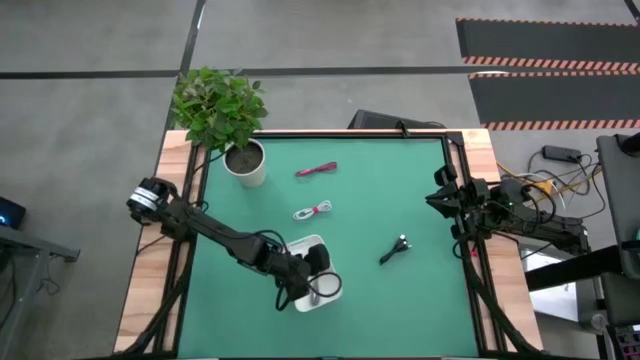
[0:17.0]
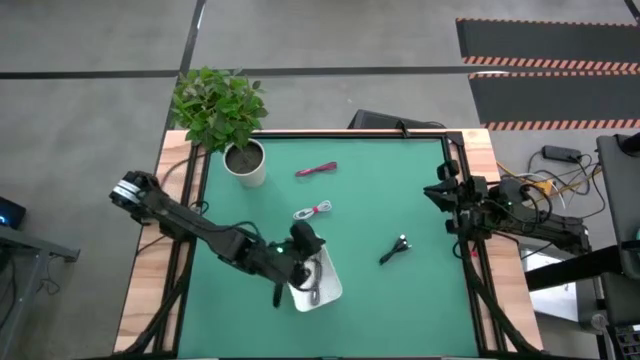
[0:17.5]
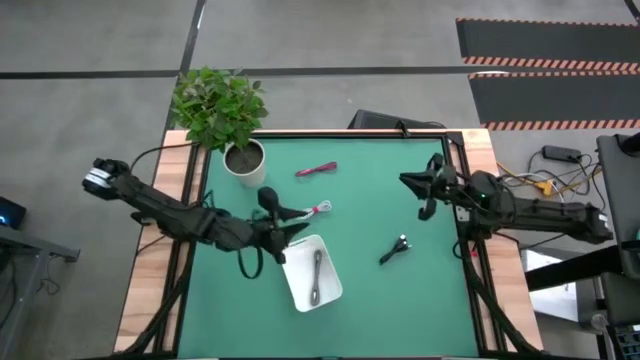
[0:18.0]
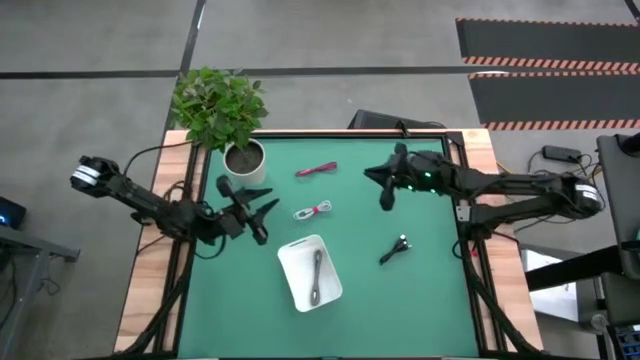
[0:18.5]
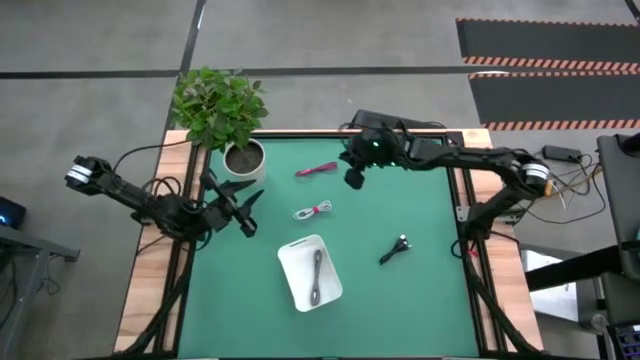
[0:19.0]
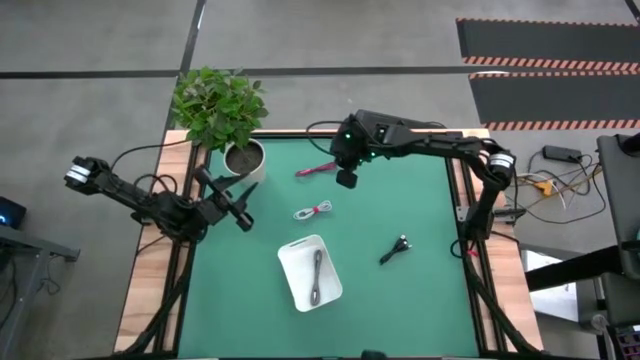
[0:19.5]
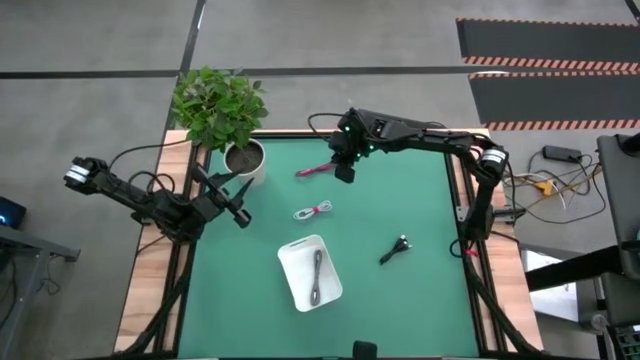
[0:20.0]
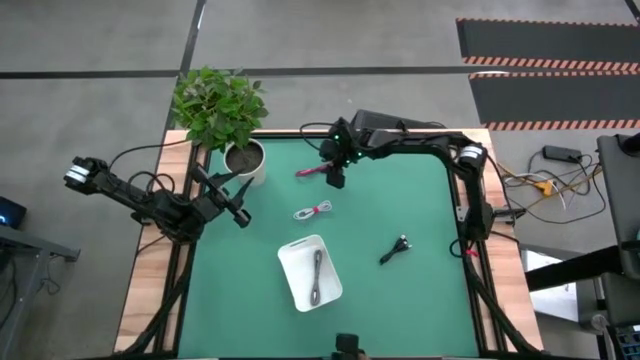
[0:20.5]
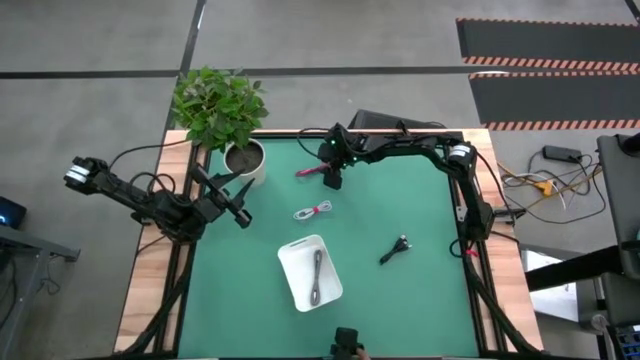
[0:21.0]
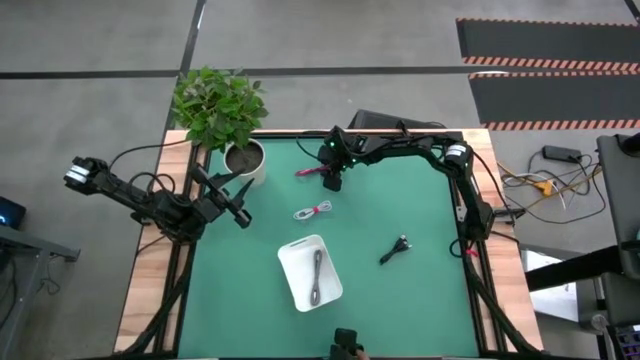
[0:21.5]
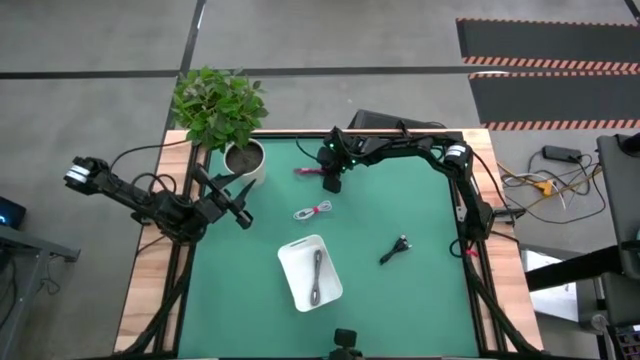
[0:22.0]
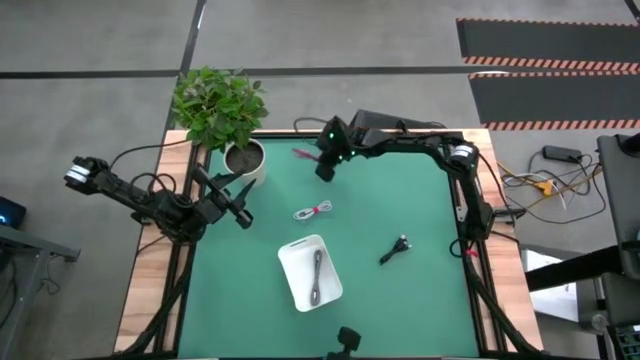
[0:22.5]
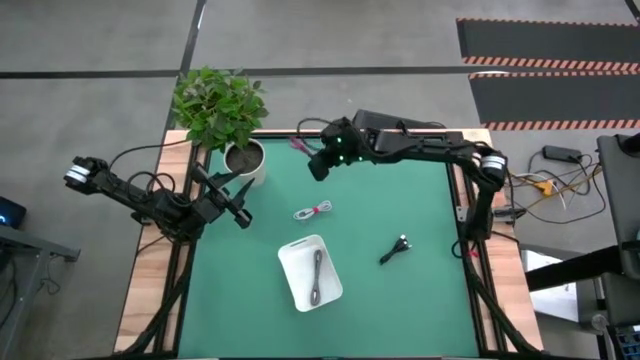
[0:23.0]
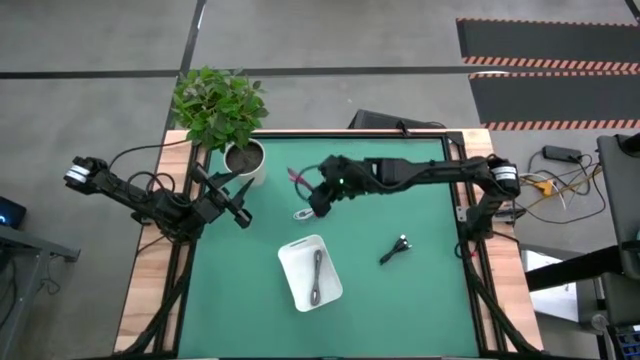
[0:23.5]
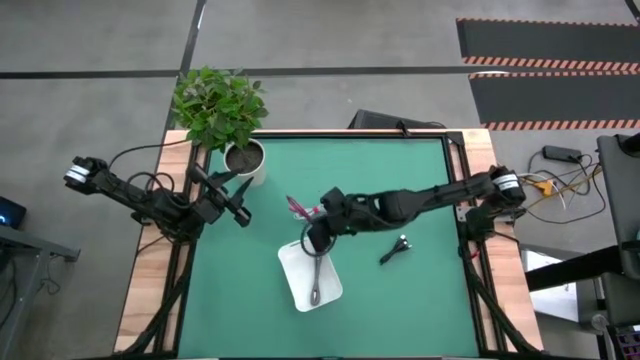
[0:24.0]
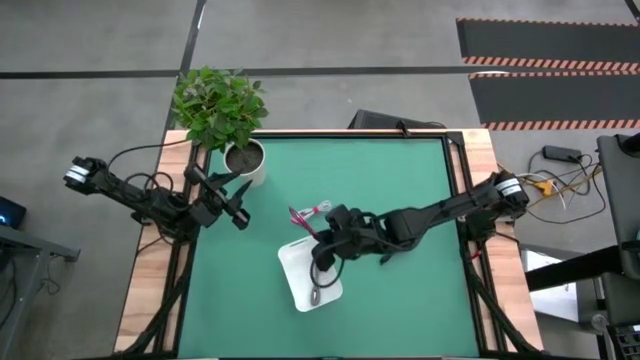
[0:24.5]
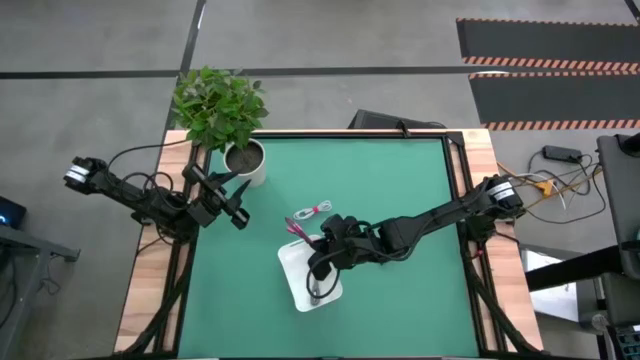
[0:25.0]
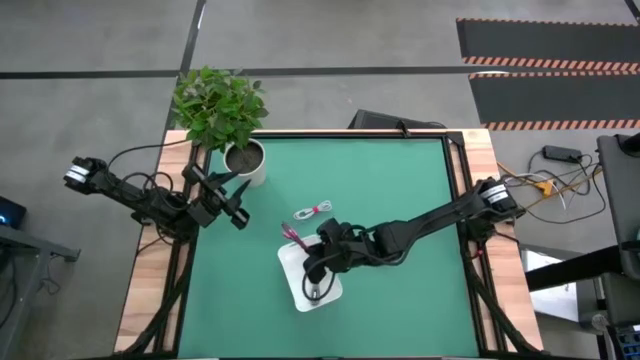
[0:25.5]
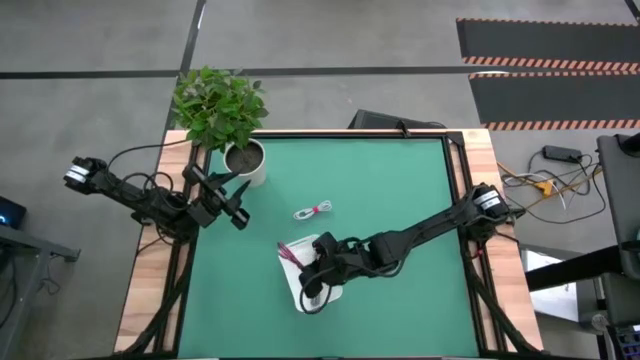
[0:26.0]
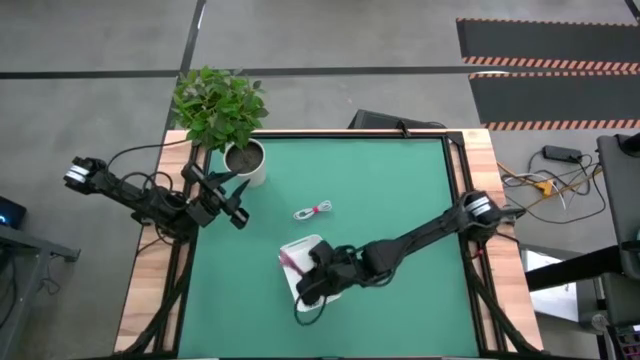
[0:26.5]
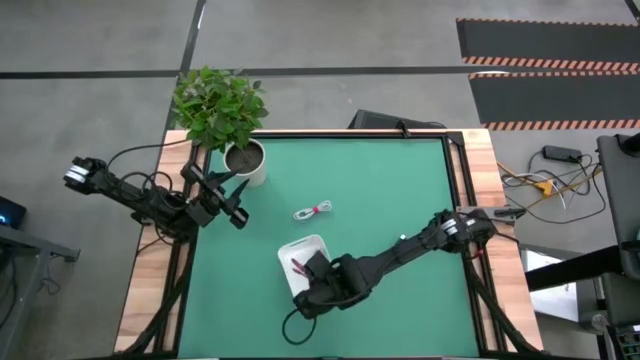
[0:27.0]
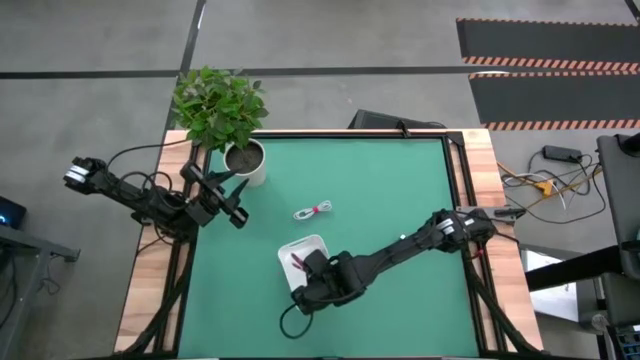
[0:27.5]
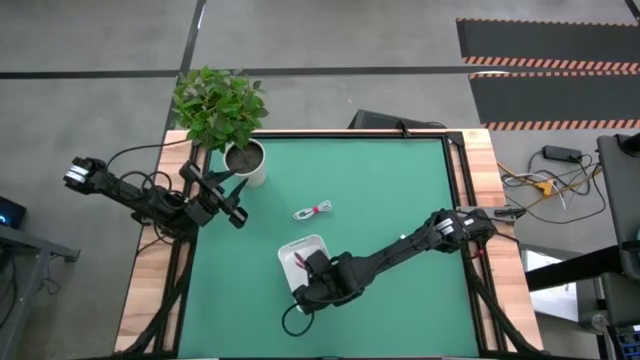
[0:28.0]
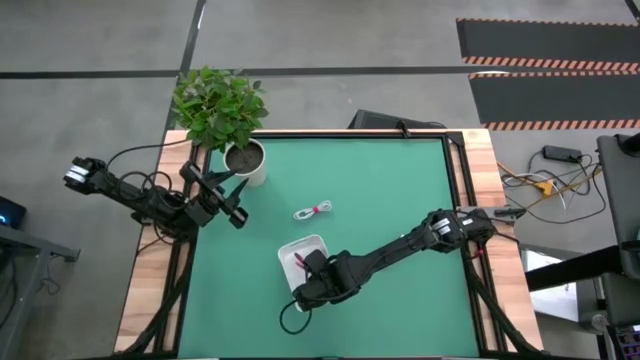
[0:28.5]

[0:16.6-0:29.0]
Task: Pick and place USB-C Cables
Put the red charger cable into the white bin

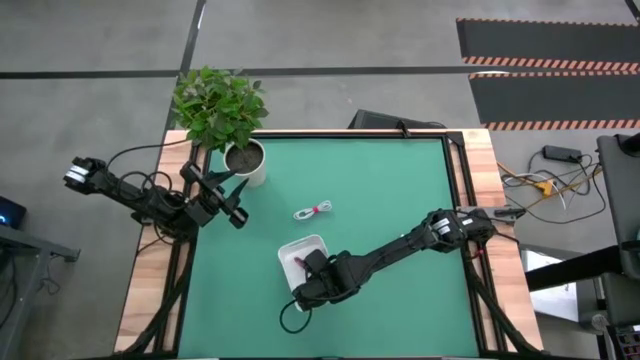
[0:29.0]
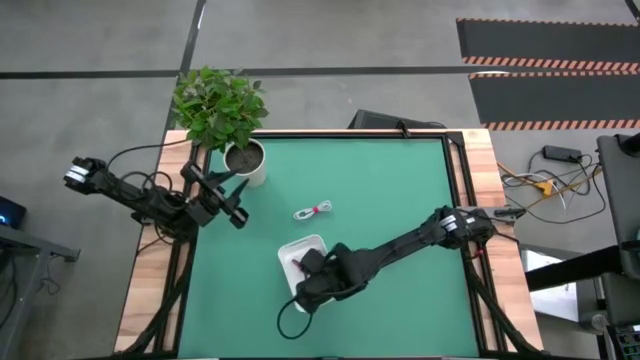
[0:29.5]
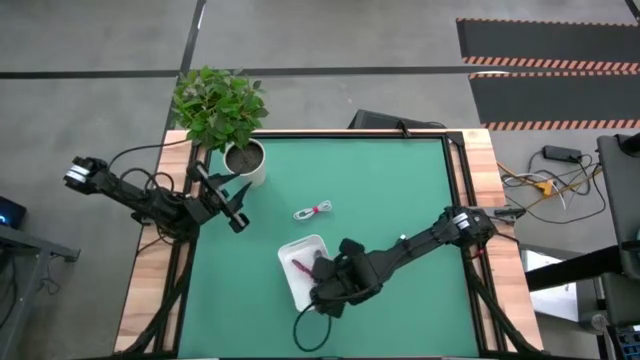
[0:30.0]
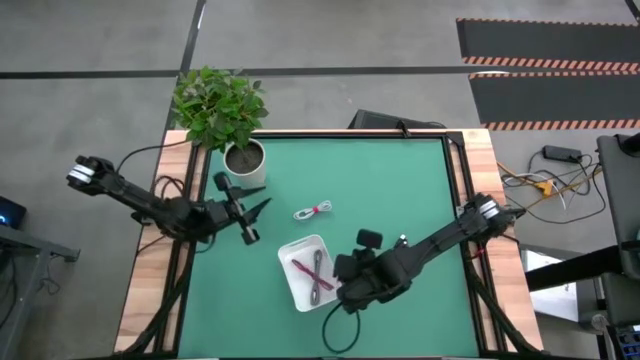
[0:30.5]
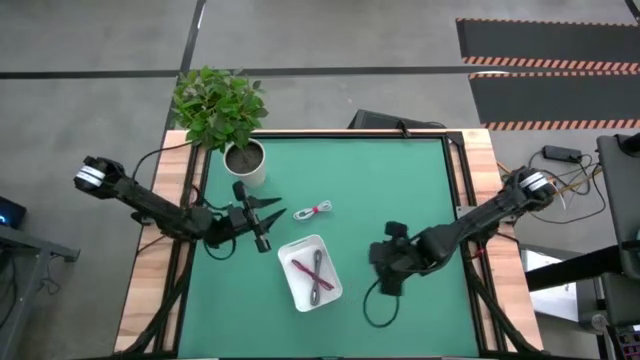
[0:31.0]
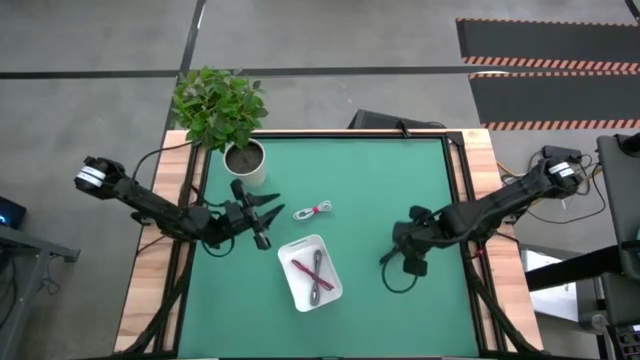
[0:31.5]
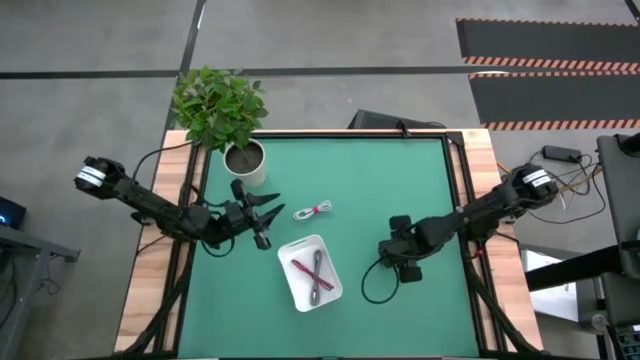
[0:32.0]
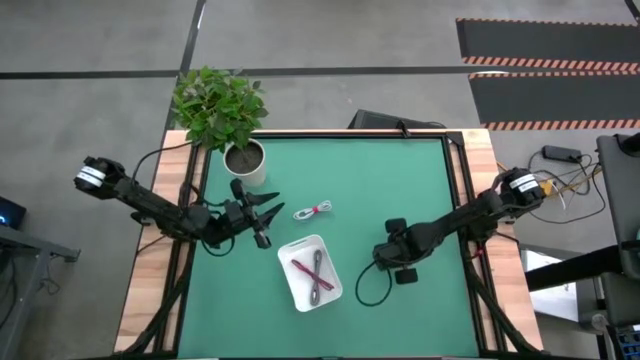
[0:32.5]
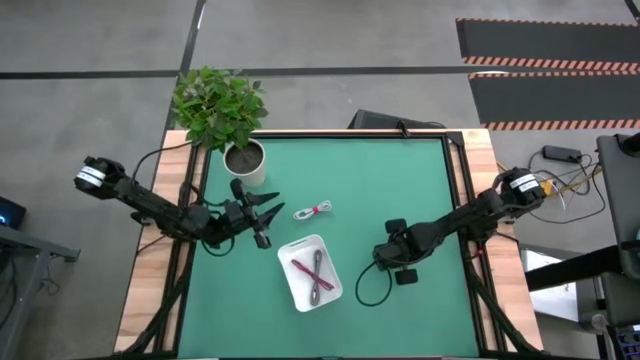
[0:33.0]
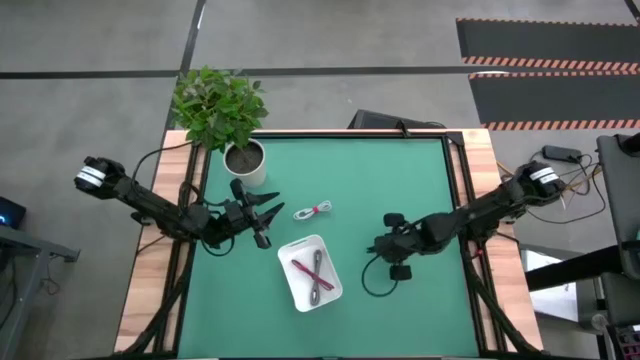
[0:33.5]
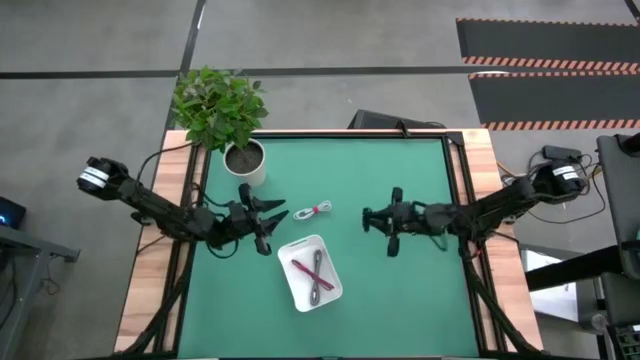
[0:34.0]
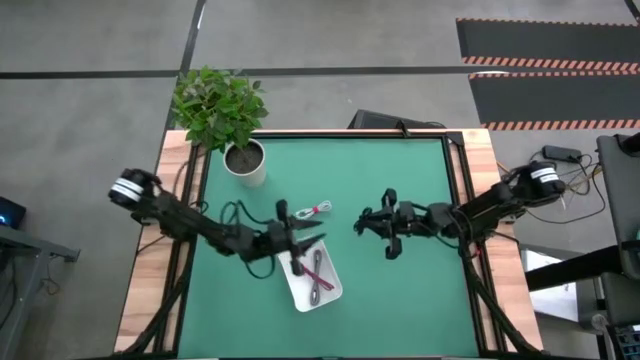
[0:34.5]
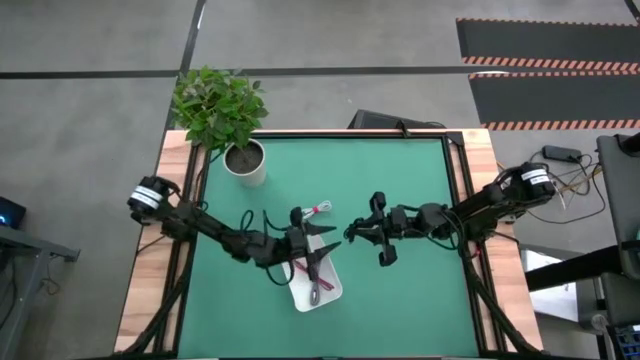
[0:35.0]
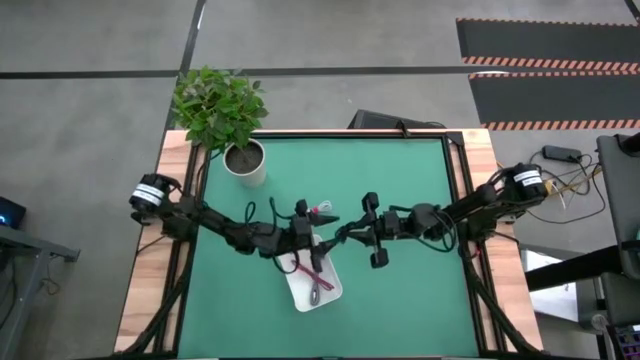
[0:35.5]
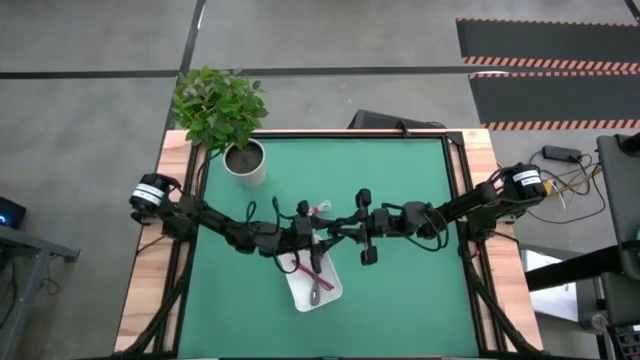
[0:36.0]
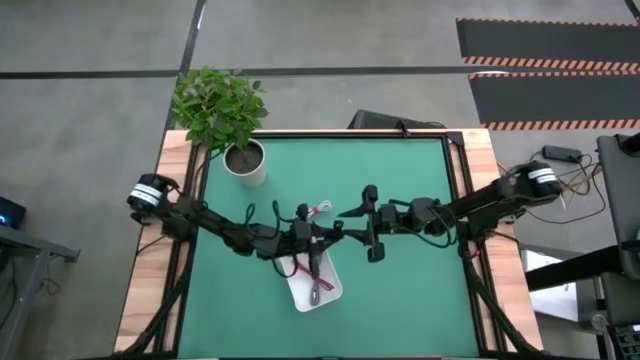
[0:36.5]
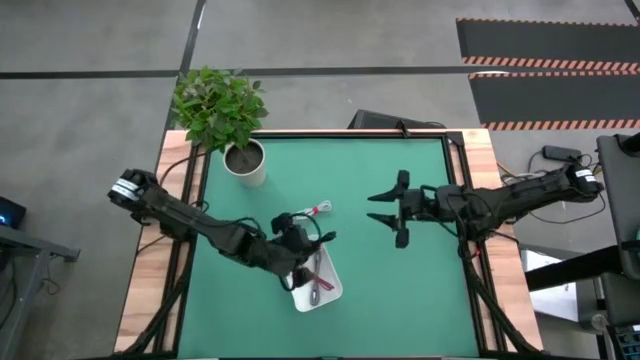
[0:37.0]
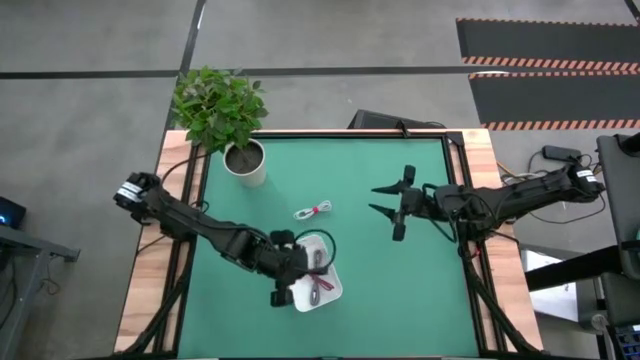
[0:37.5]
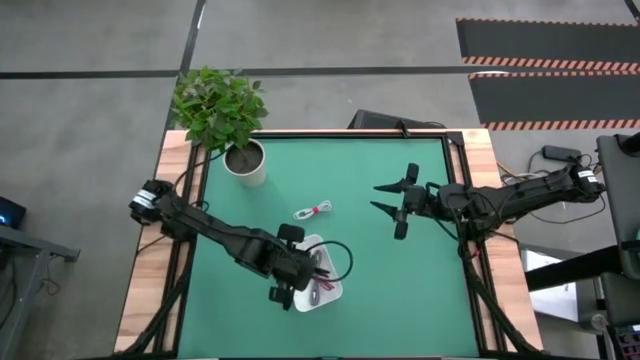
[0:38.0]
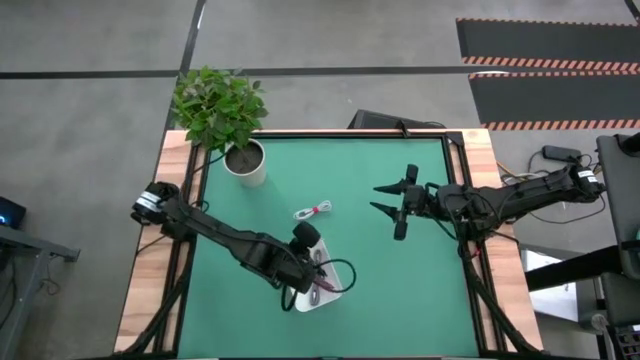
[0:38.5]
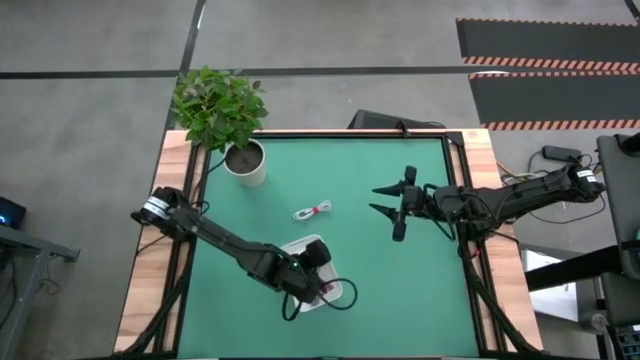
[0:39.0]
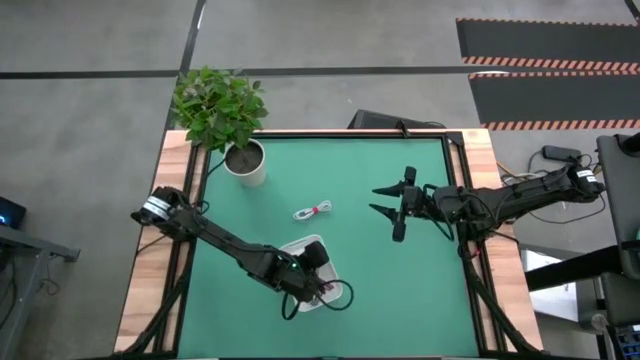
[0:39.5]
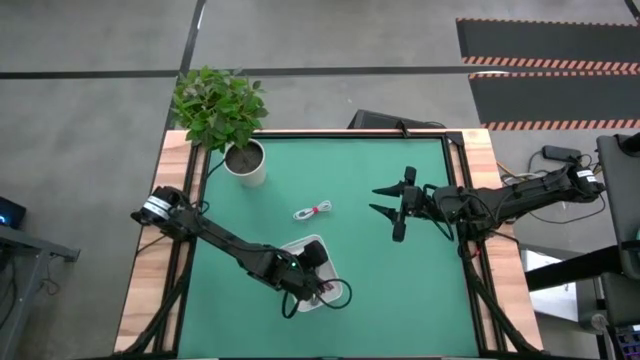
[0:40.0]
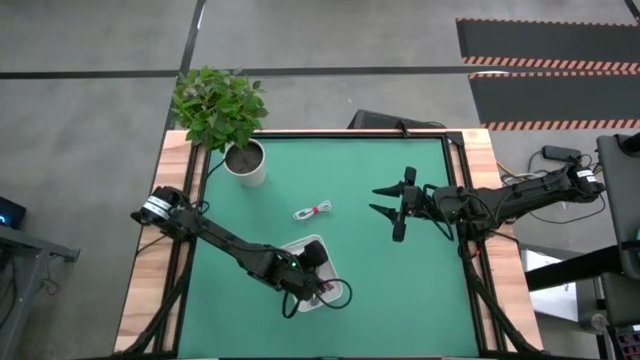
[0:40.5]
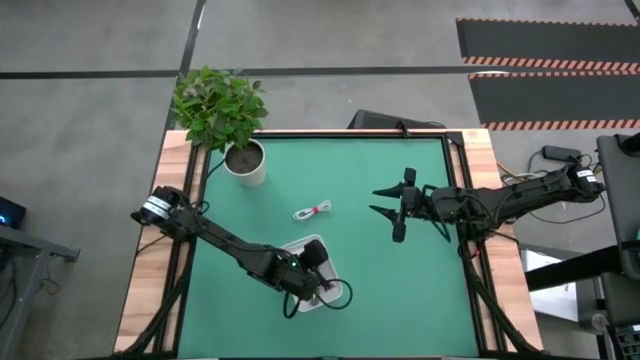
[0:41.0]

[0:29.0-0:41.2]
Put the black charger cable into the white bin
